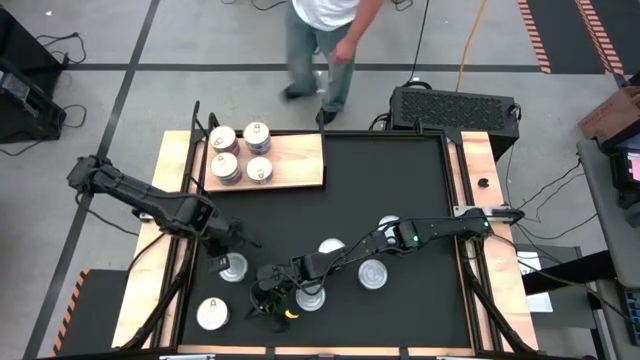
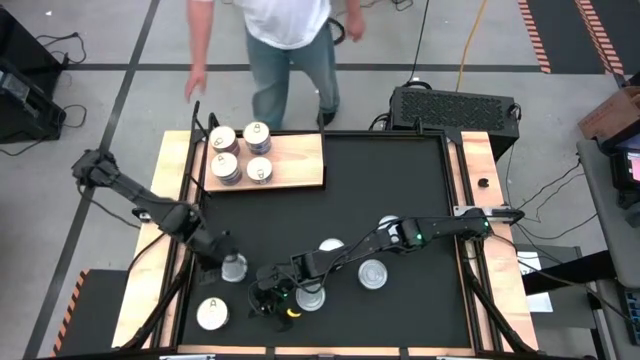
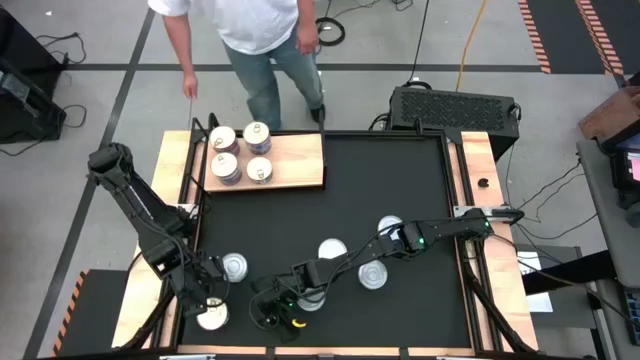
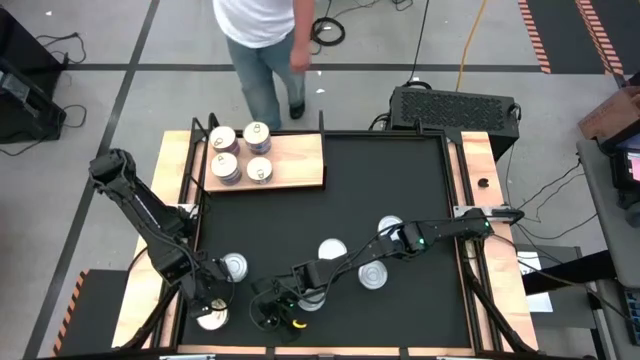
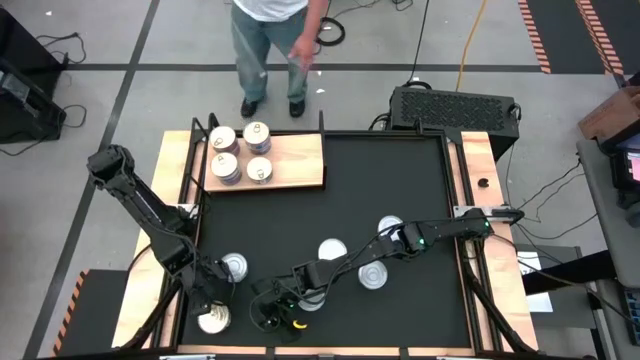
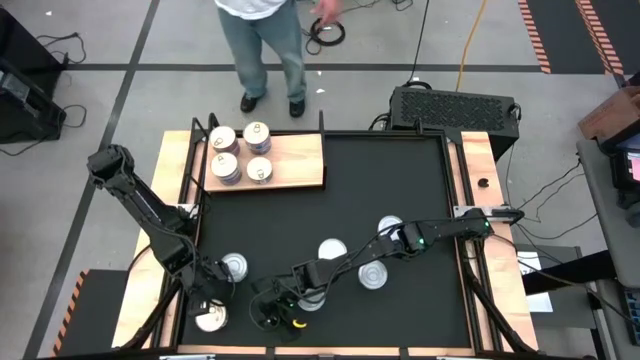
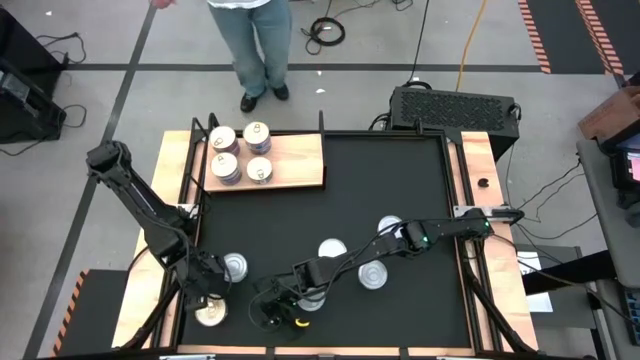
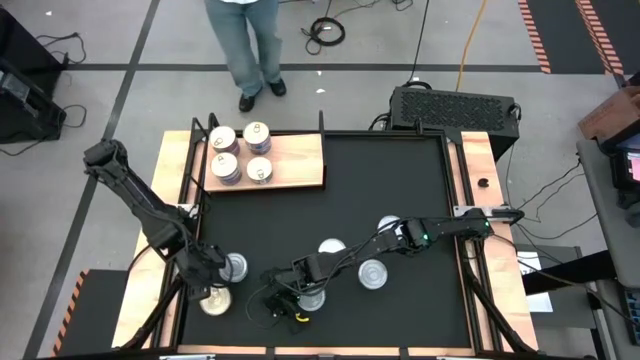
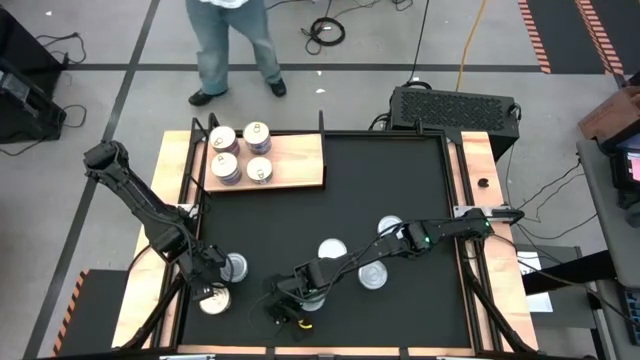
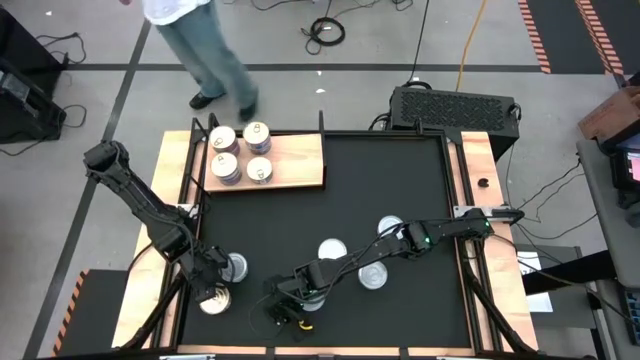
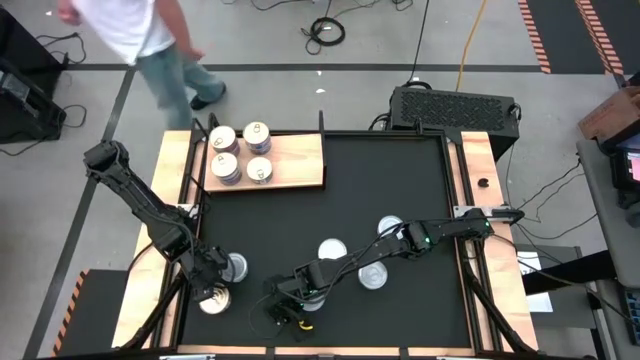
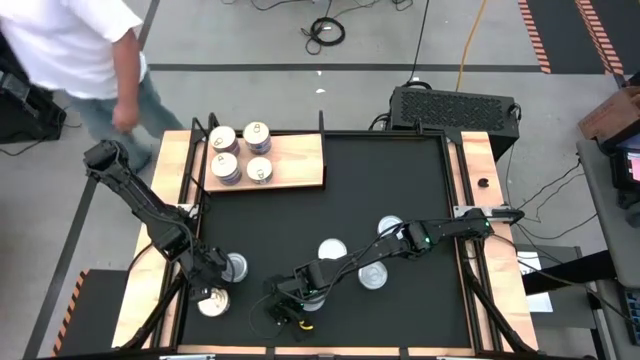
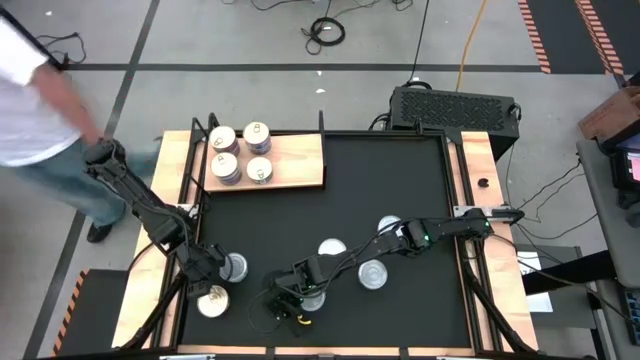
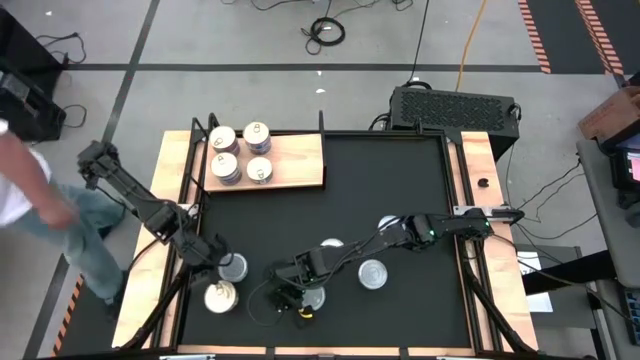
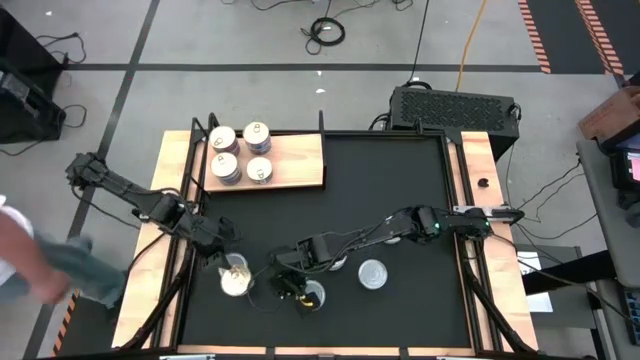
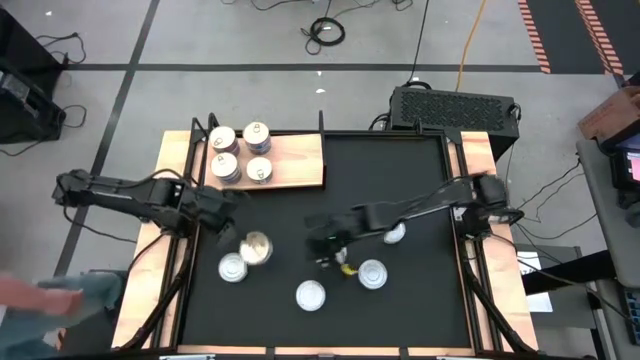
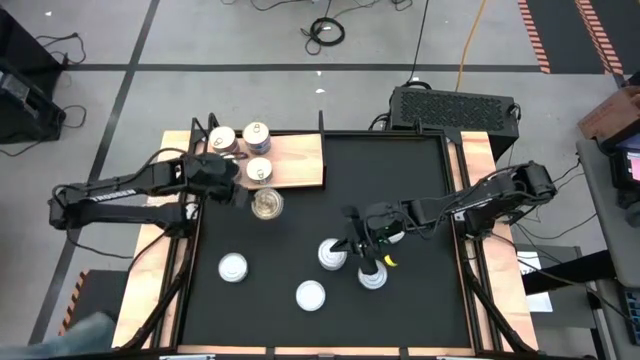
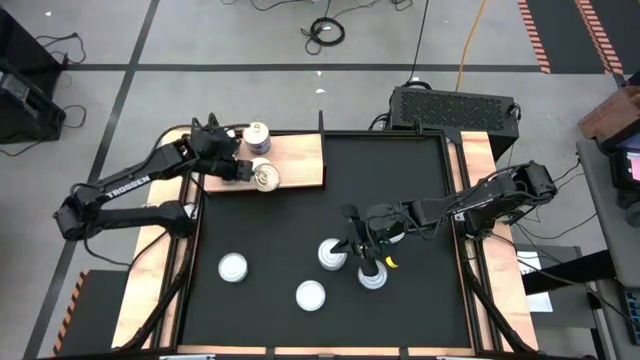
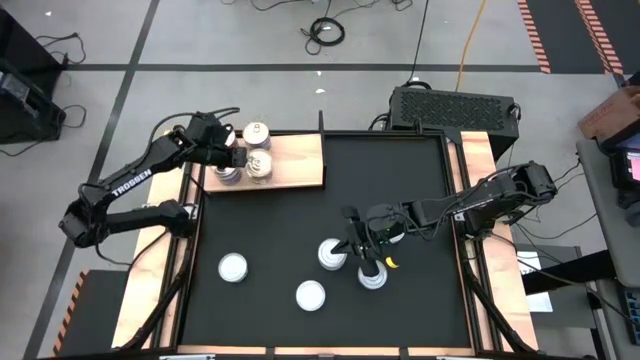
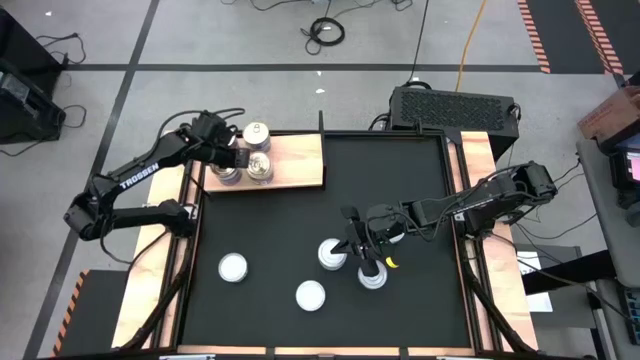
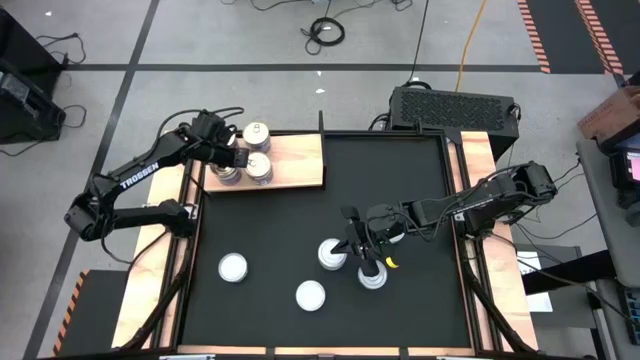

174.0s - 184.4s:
Task: Stack canned seafood by type on shelf
Stack the blue and pink tuna can on the top of the blue and pink tuna can on the shelf

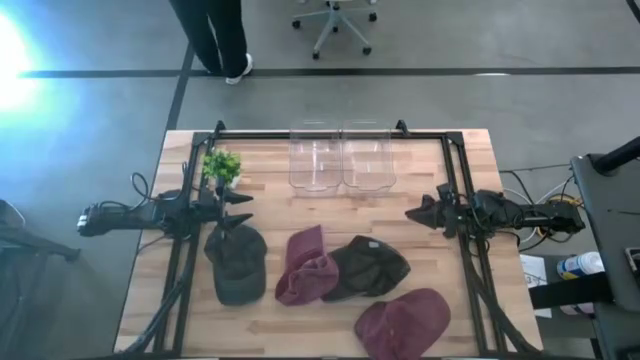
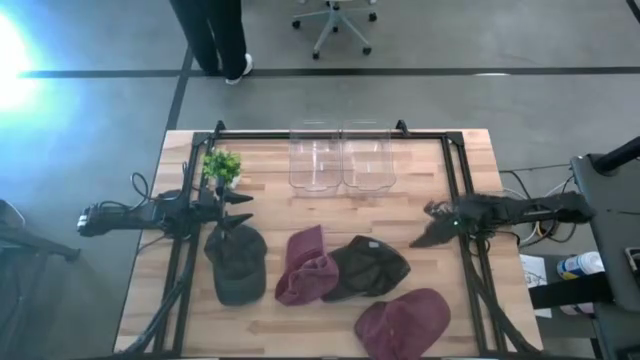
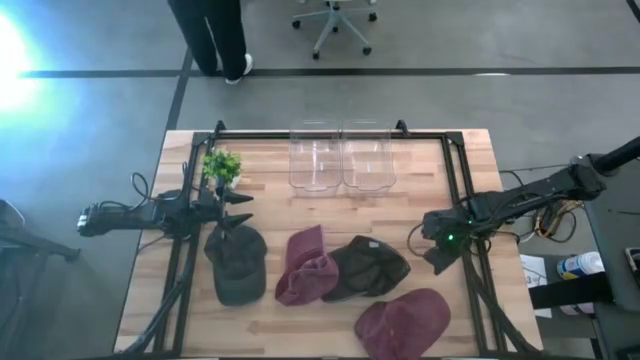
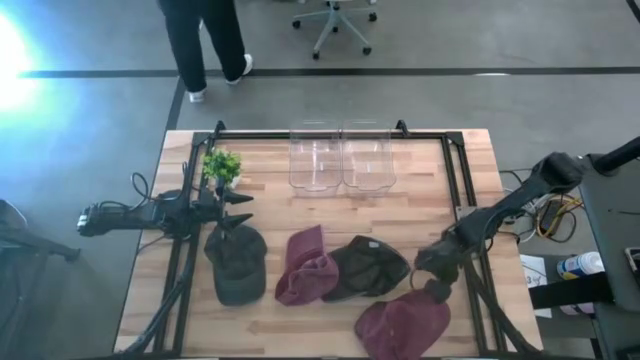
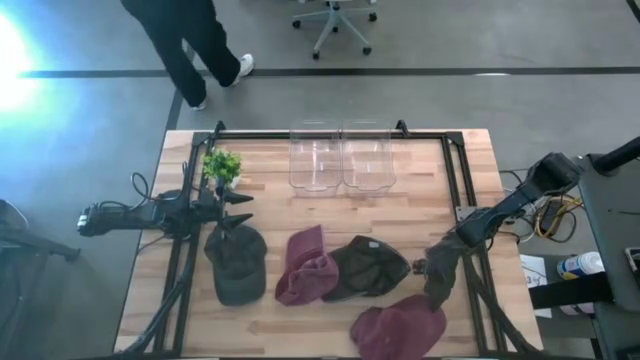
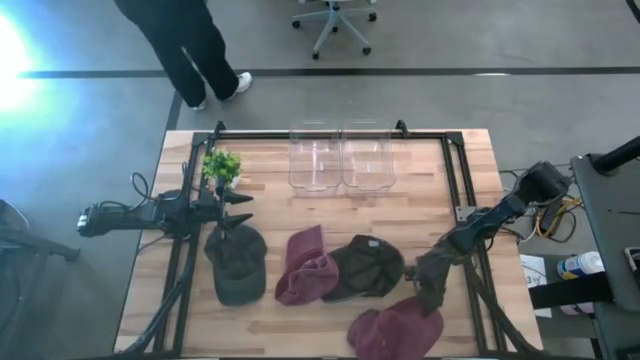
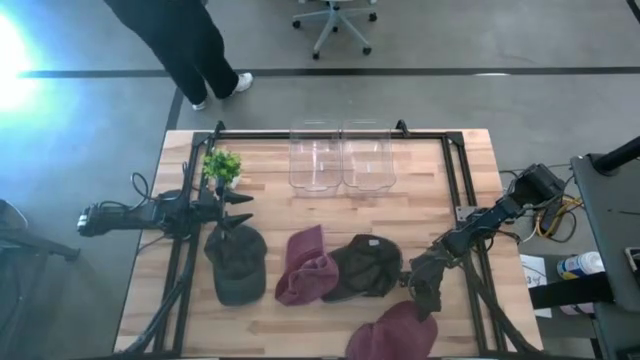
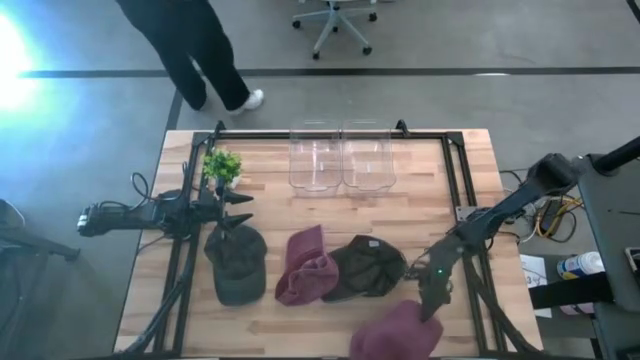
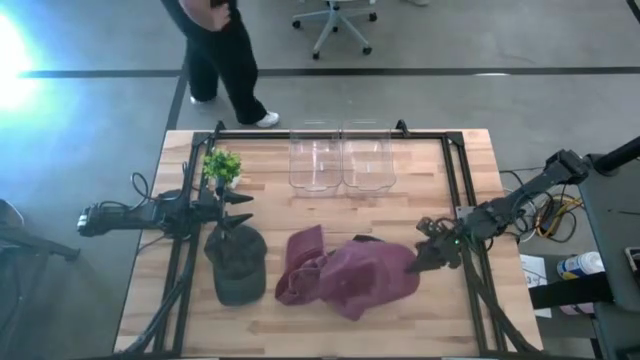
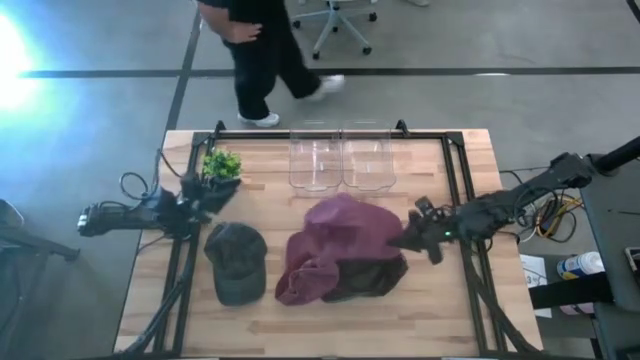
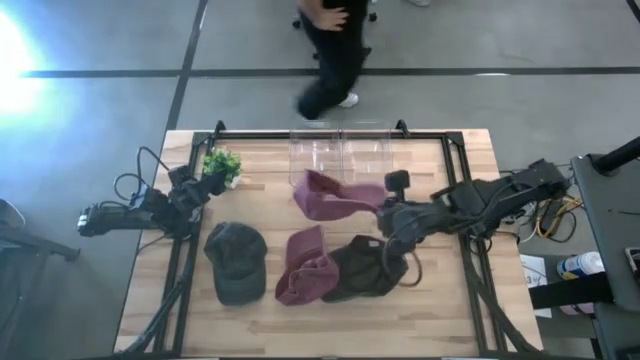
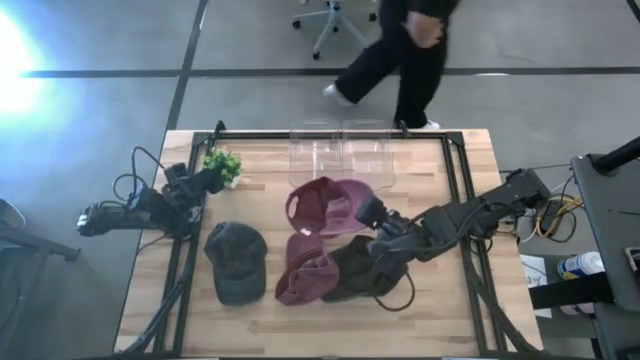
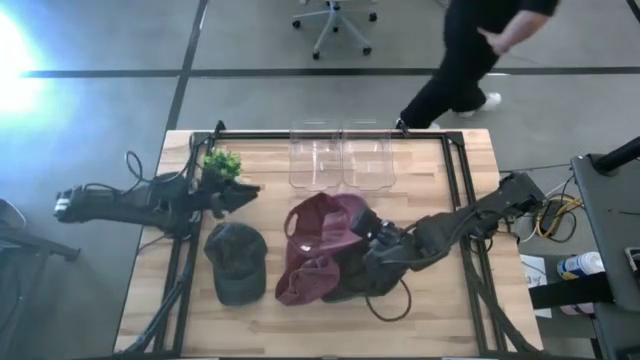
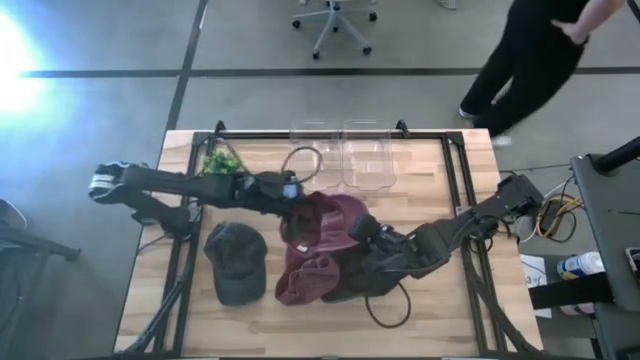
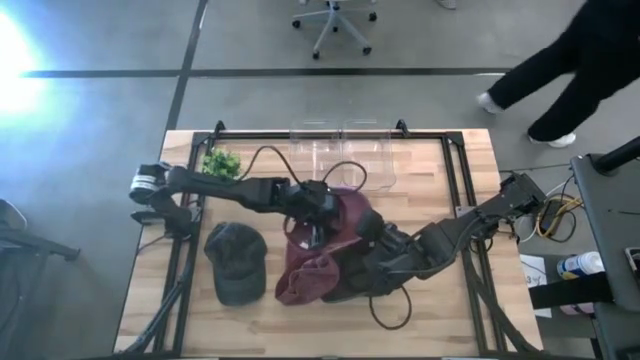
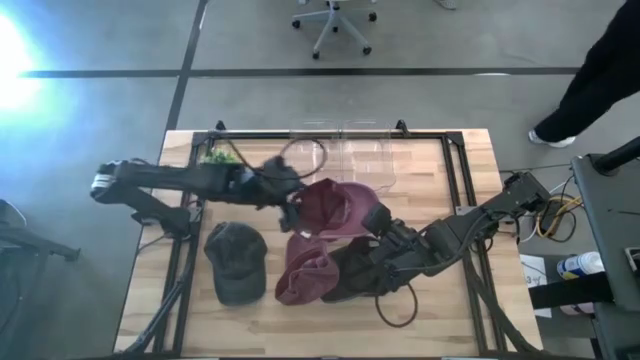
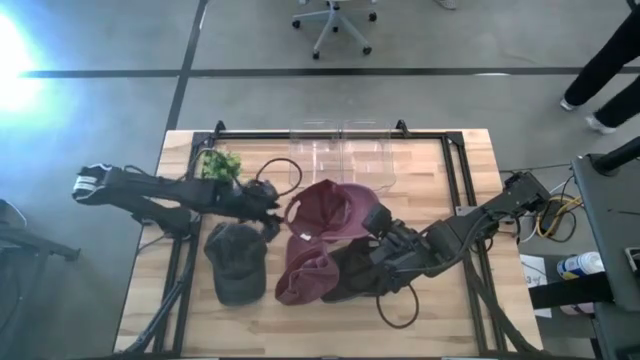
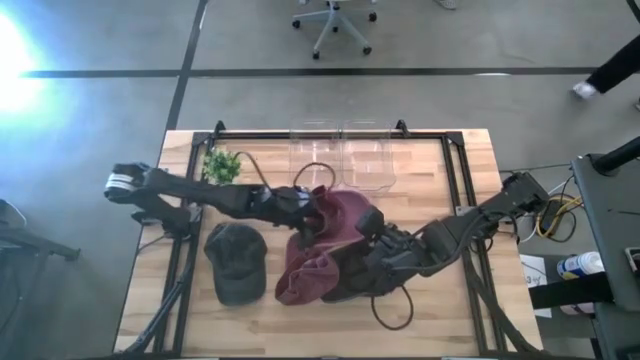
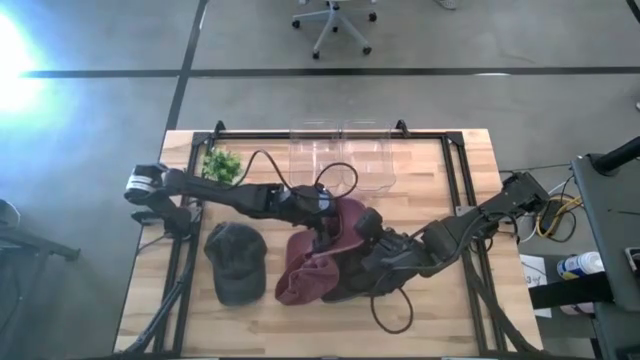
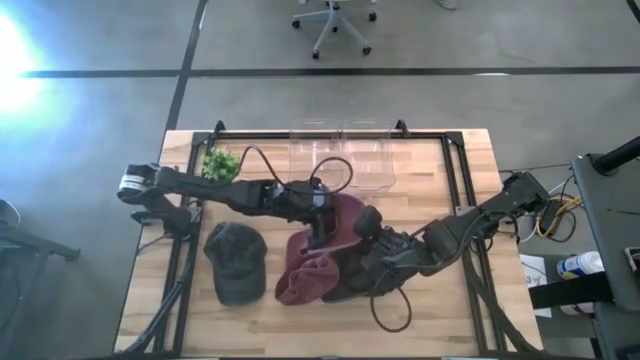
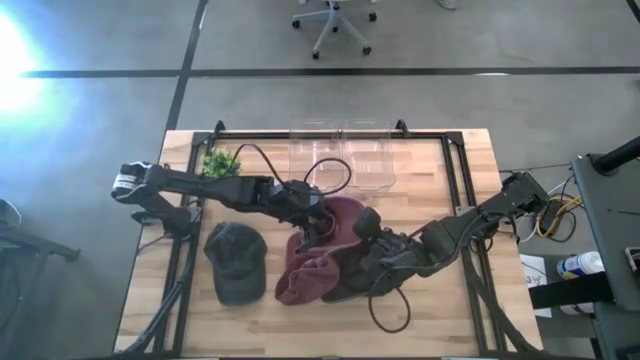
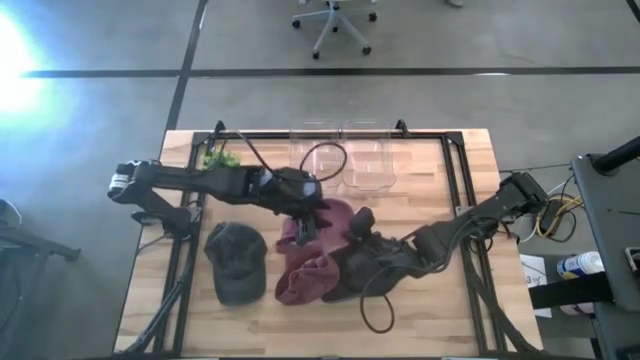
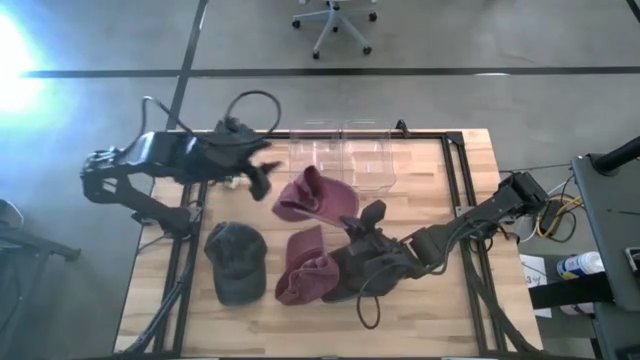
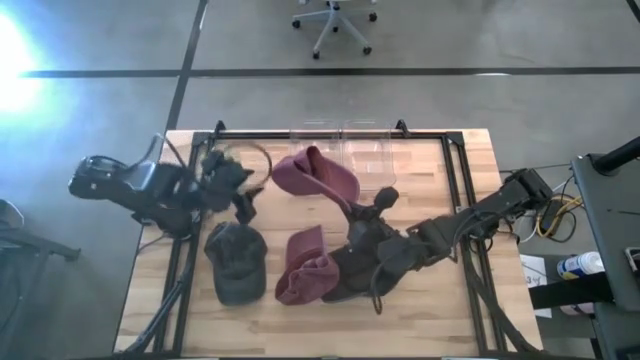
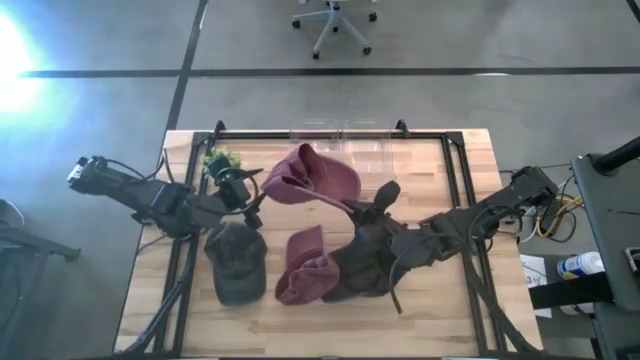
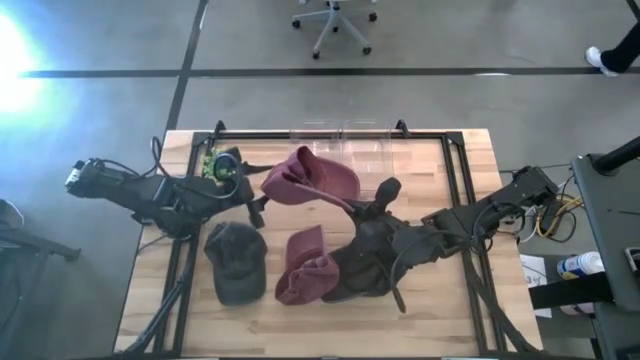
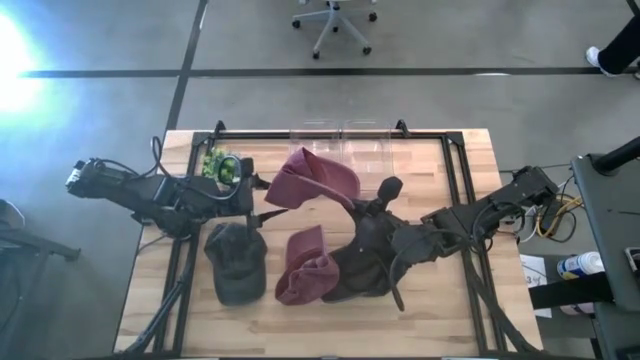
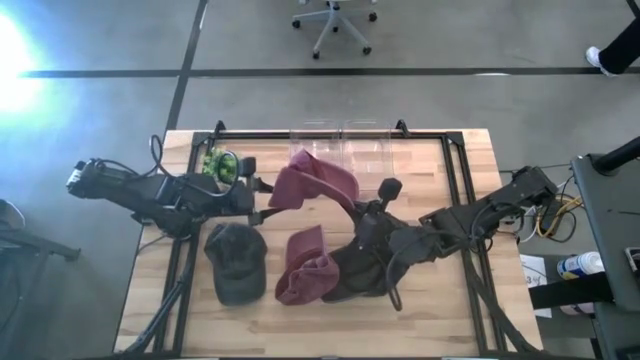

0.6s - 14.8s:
Task: Pick & Place hat
Put the bottom red cap into the left transparent bin
